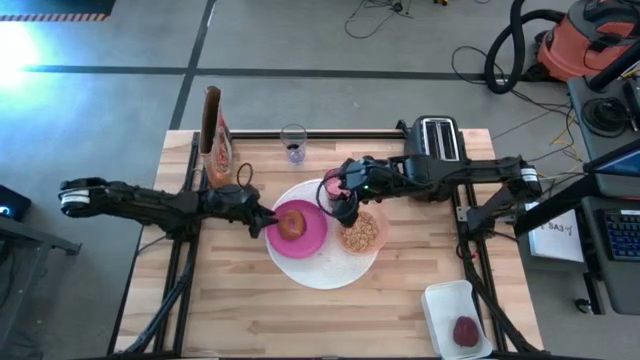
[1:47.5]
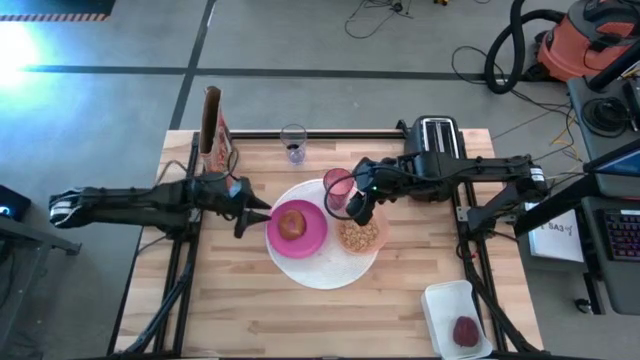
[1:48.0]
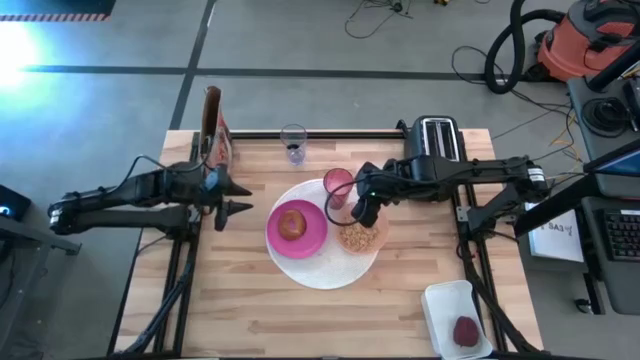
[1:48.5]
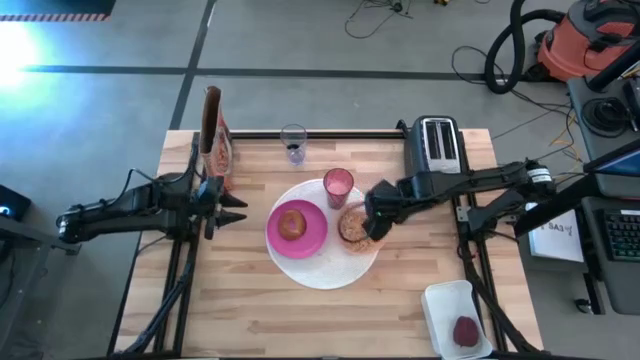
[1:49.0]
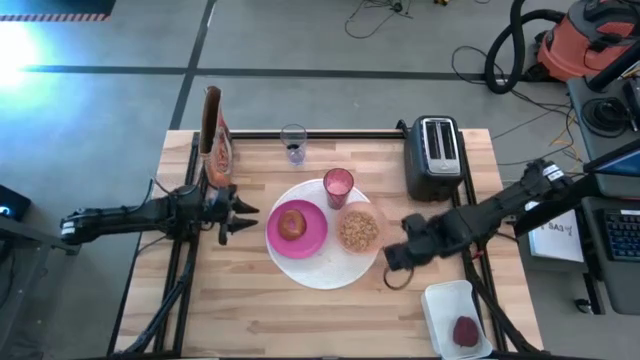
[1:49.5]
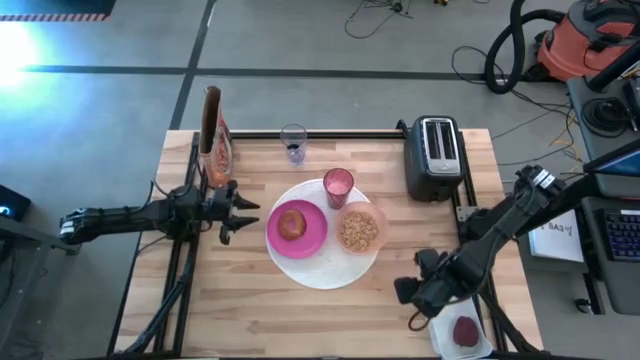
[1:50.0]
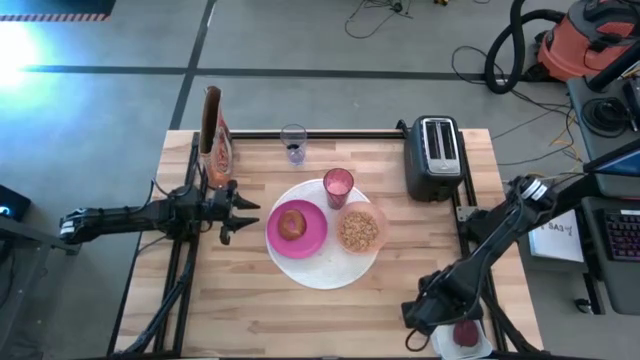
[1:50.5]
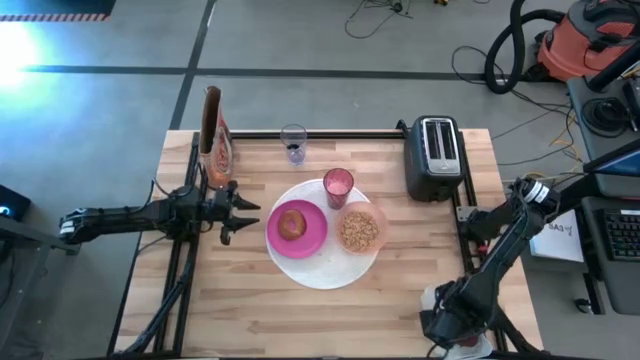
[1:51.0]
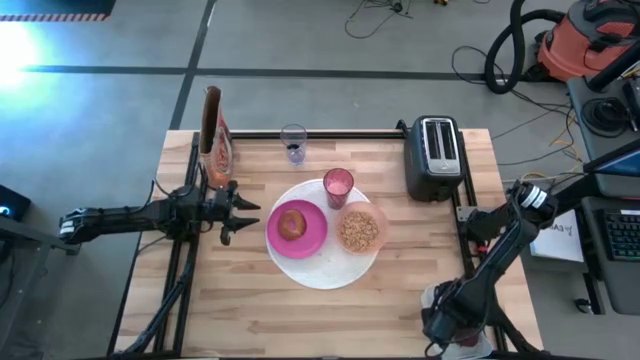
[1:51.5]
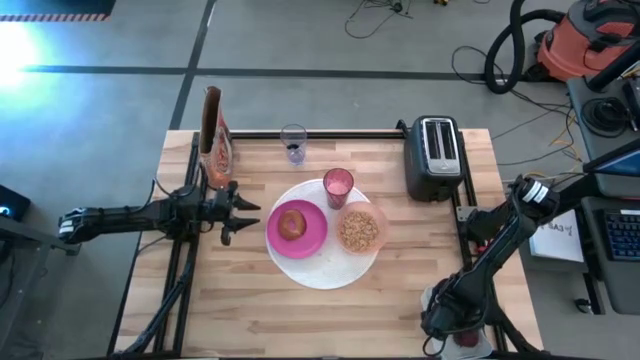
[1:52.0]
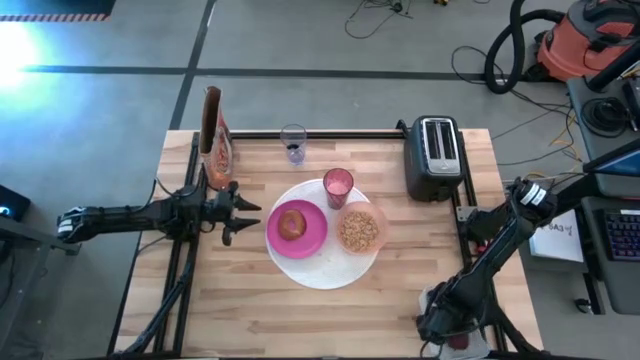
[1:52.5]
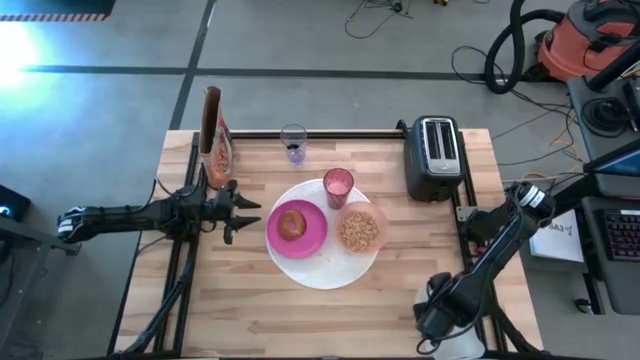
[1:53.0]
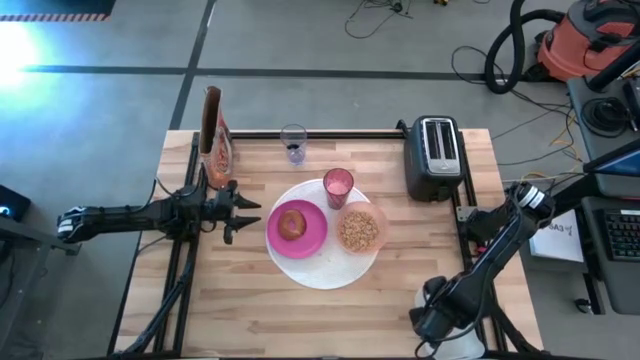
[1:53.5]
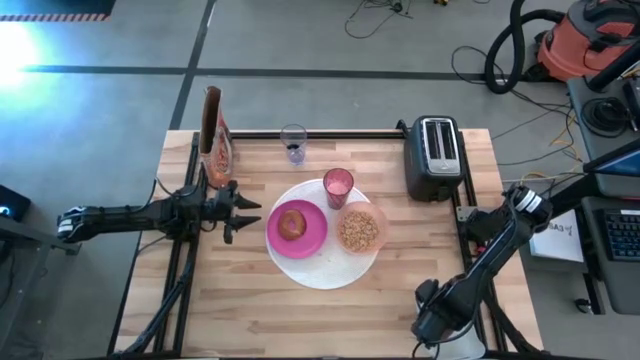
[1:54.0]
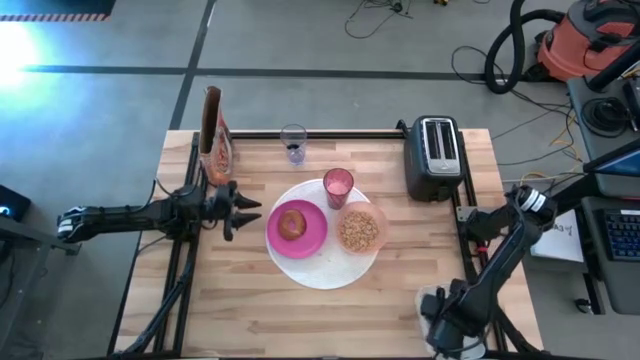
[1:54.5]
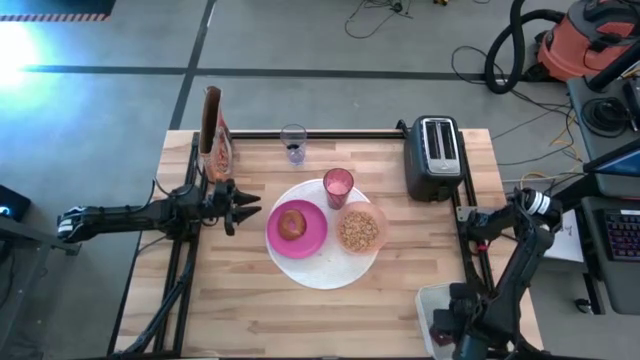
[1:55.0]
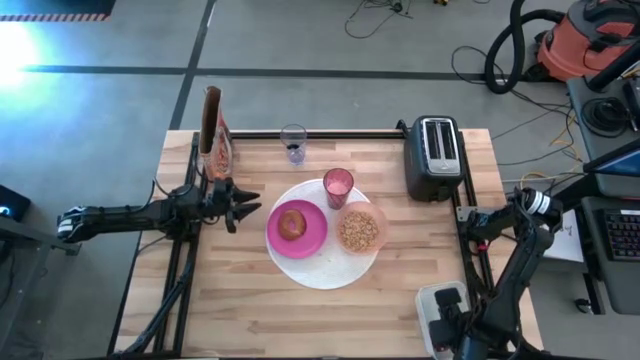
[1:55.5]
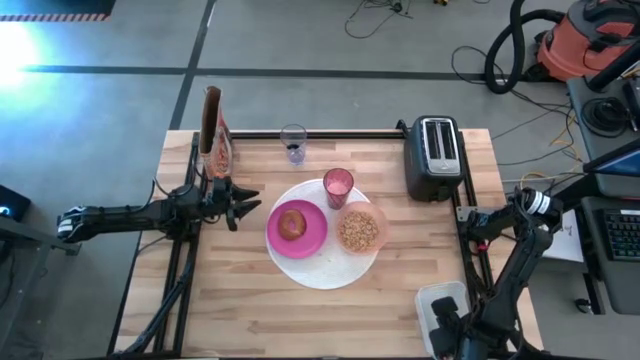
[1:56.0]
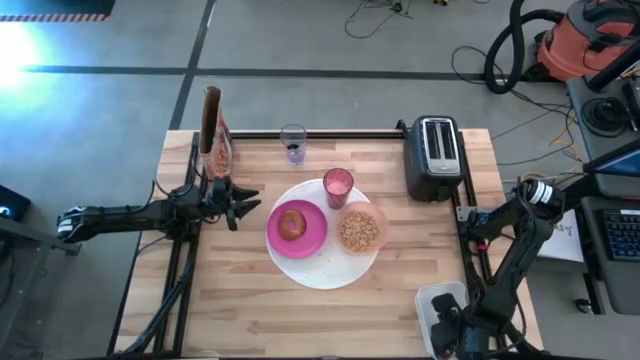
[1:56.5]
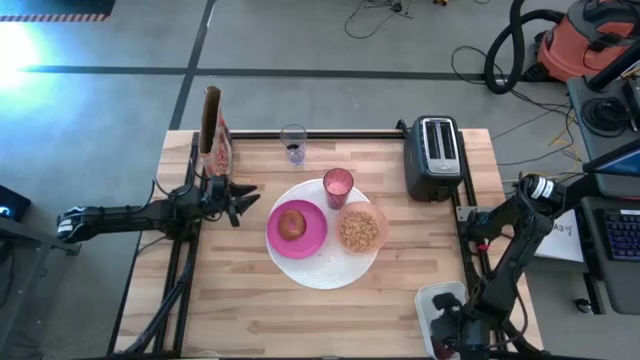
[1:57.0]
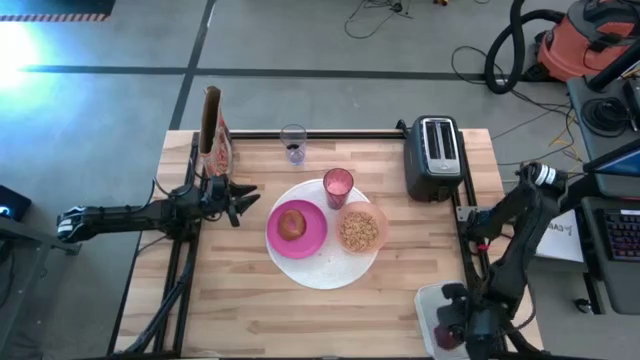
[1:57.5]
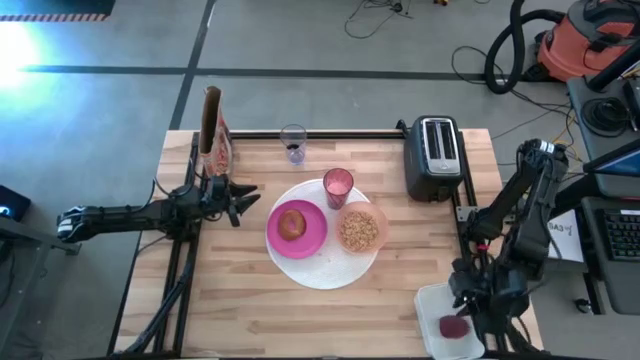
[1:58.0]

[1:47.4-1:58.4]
Task: Arrange a breakfast setting
Put the apple to the top of the pink plate

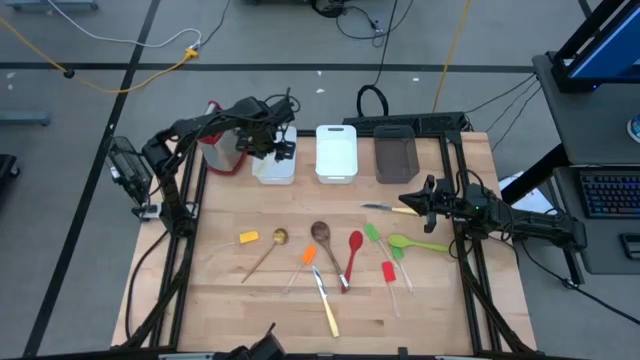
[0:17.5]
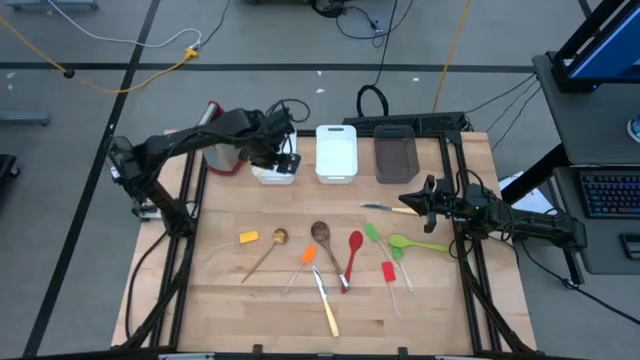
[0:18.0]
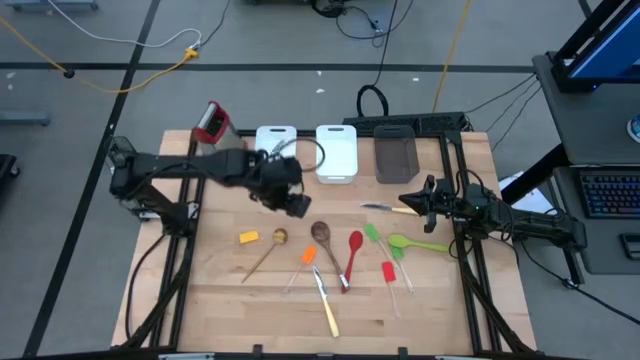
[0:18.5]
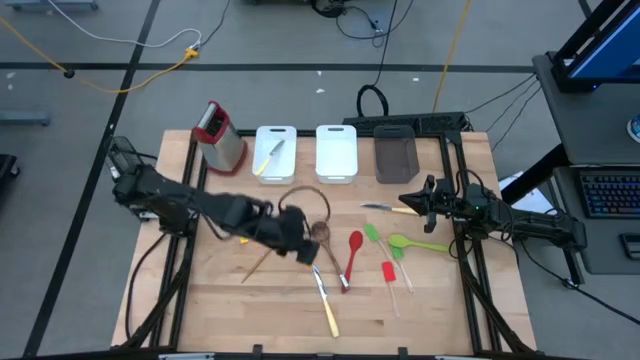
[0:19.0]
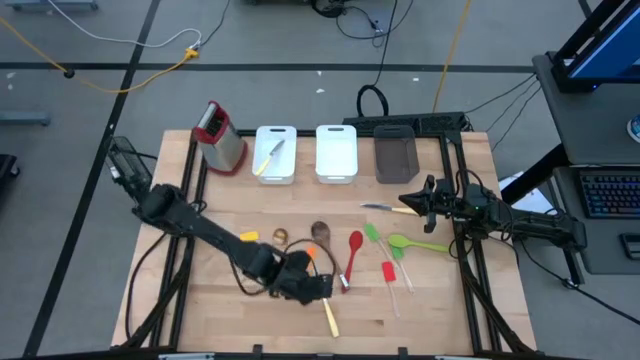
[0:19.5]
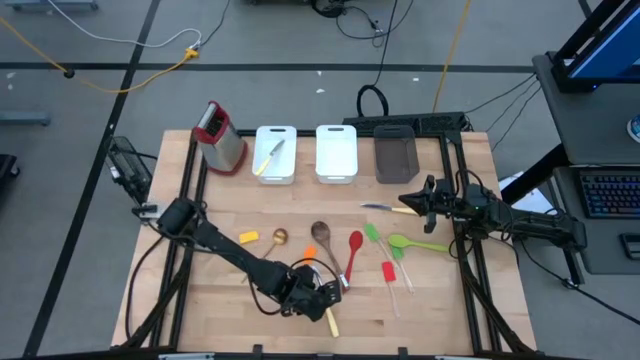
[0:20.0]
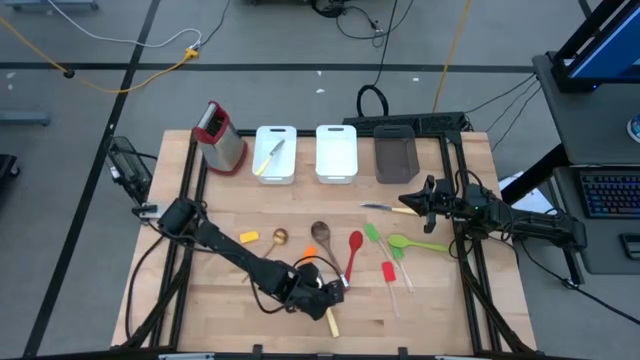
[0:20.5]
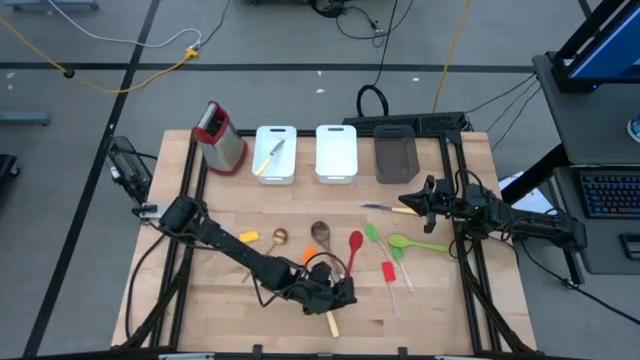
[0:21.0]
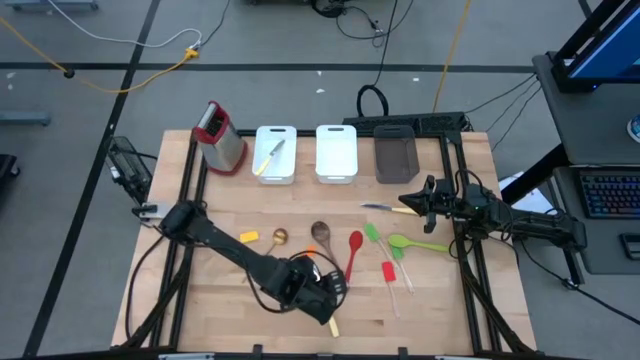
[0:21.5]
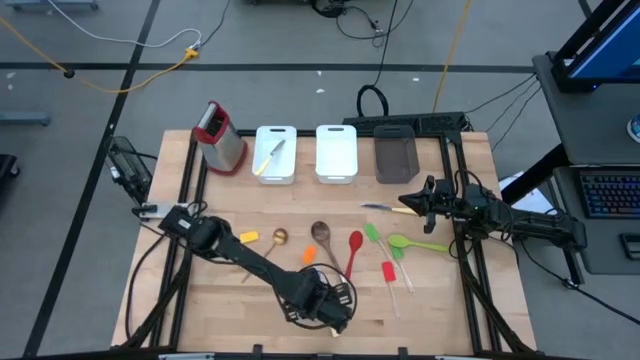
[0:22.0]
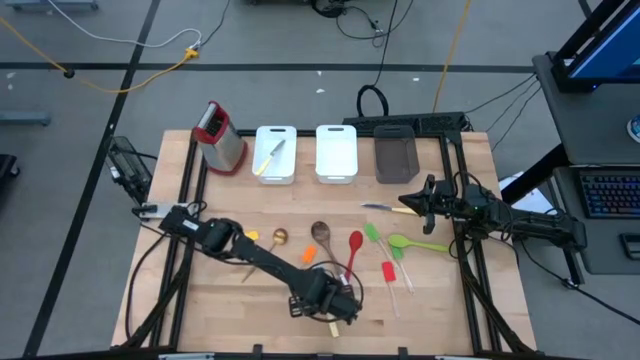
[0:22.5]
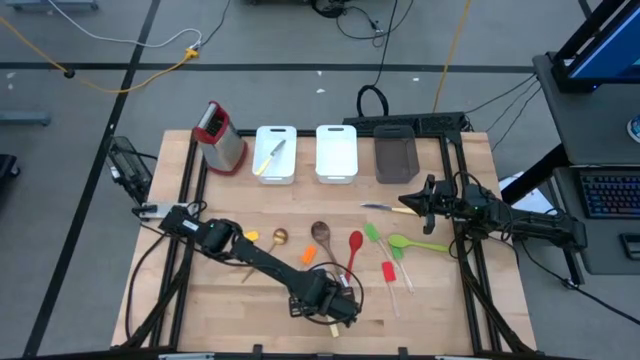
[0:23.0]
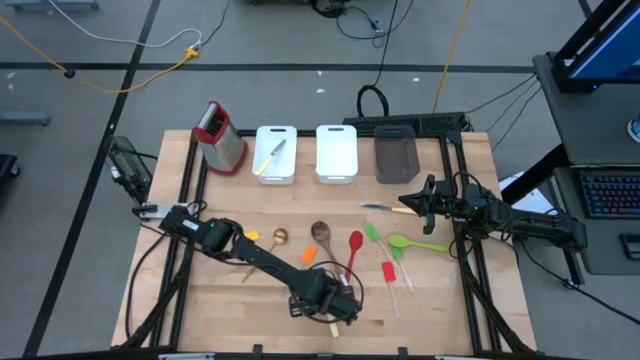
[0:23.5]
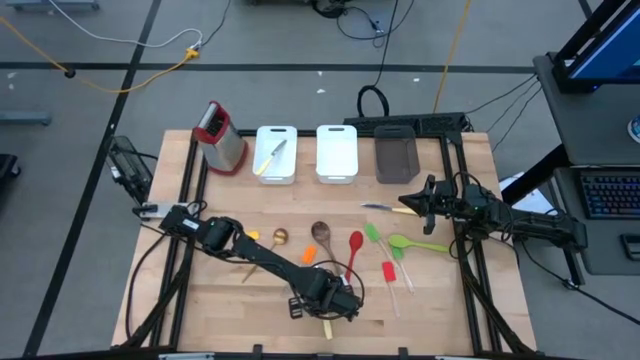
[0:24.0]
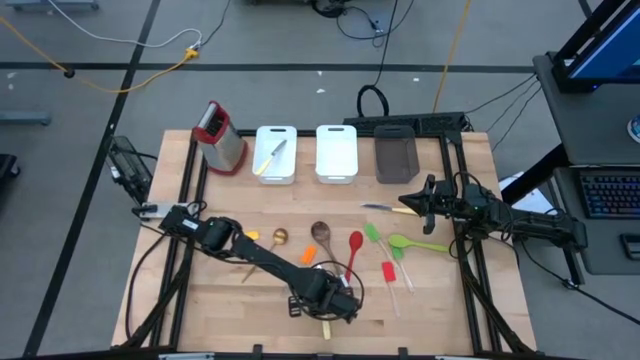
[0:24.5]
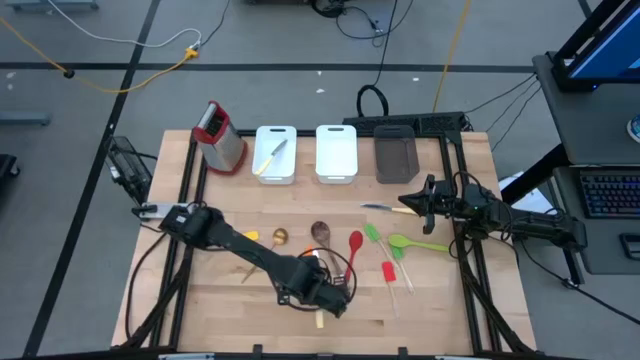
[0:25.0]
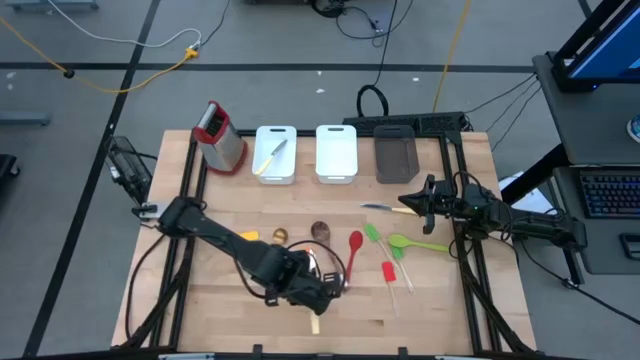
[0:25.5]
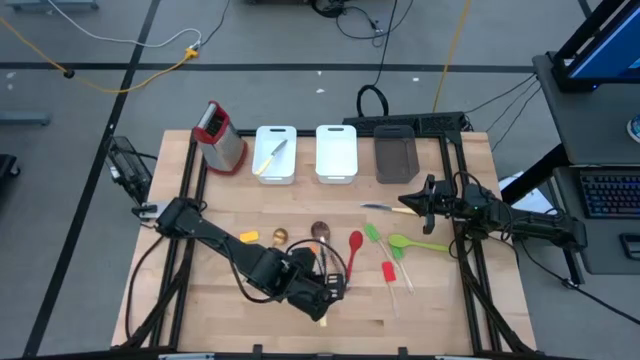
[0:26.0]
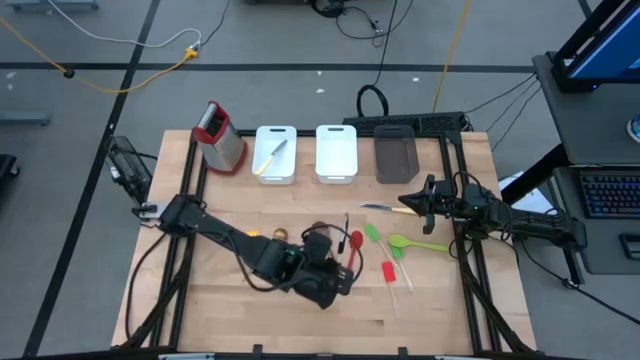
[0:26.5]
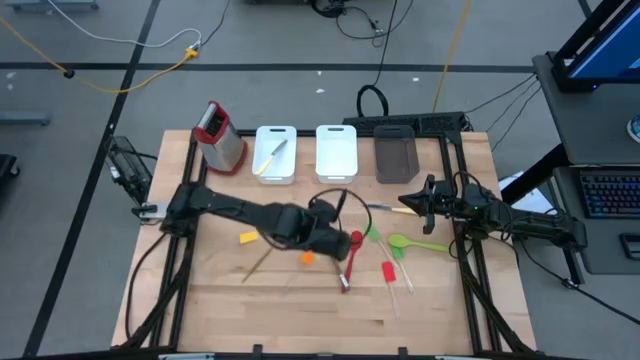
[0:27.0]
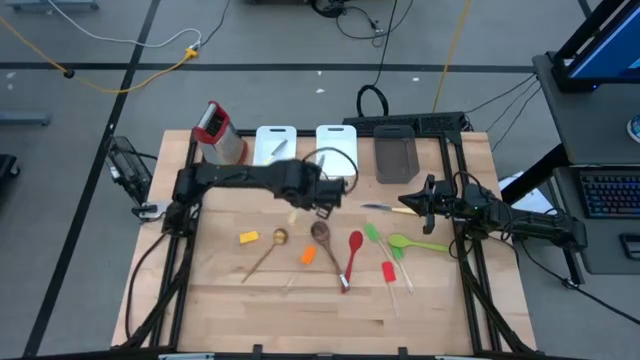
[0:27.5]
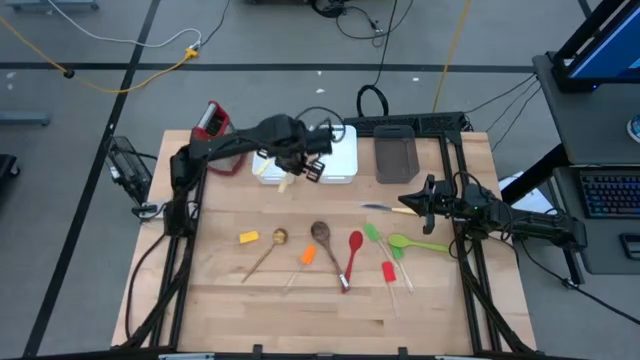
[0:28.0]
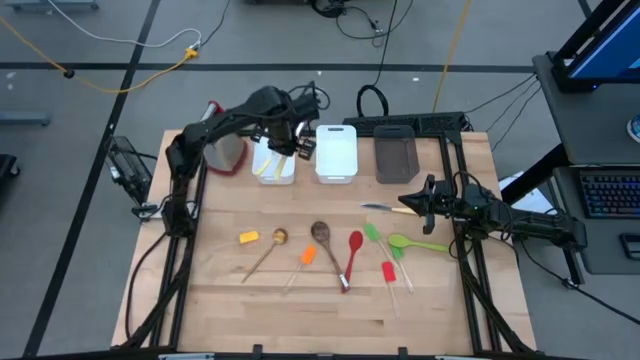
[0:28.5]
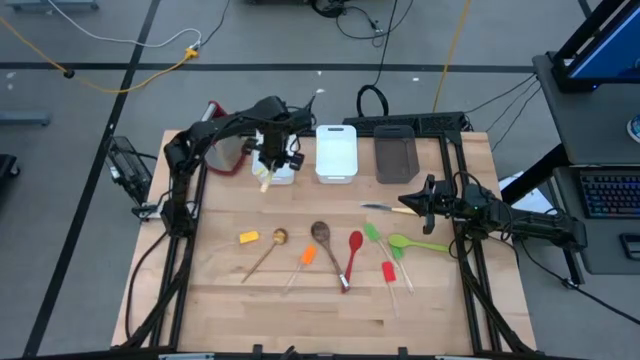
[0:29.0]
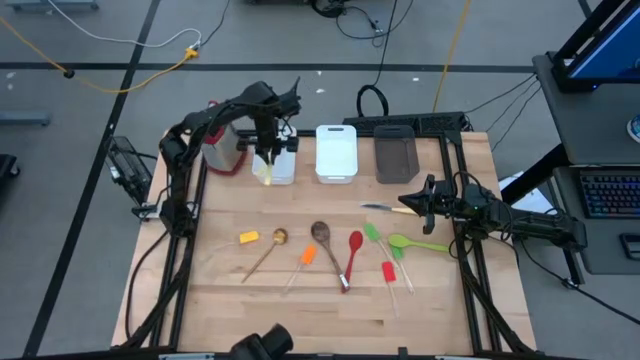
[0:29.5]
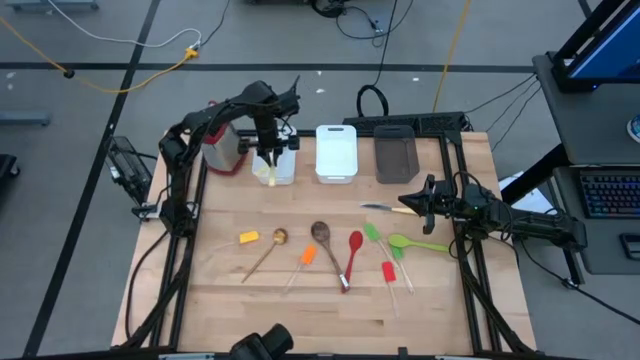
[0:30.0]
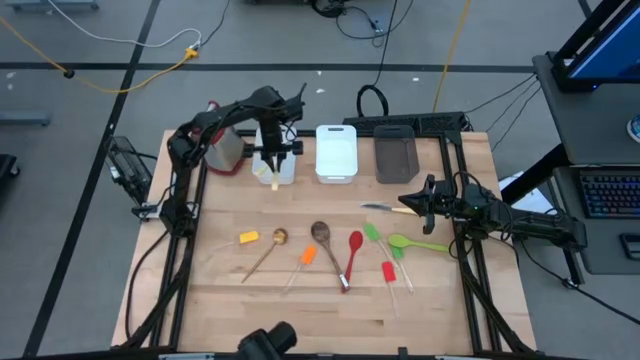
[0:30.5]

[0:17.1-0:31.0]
Task: Pick & Place Kitchen Items
Put the bottom yellow knife into the left white bin
